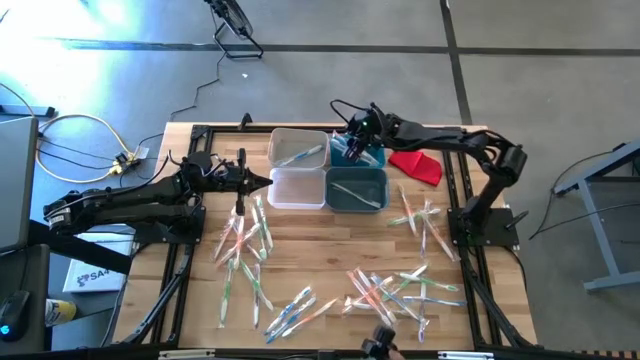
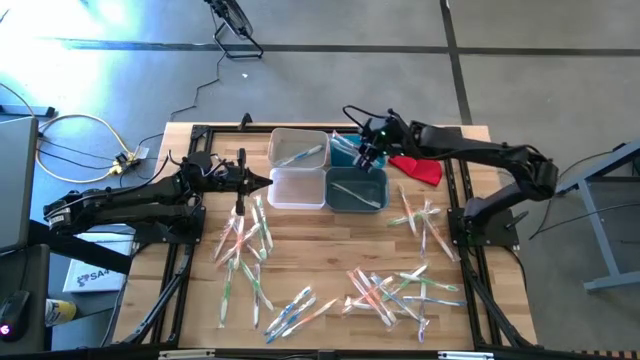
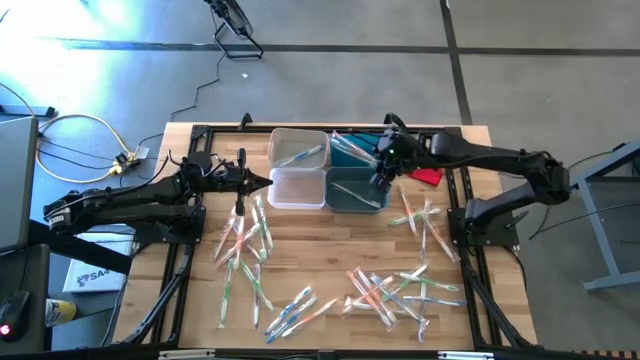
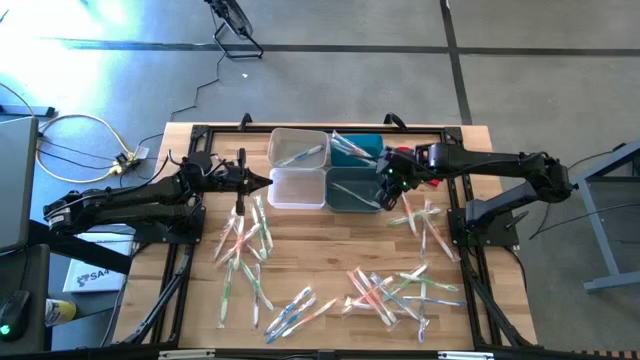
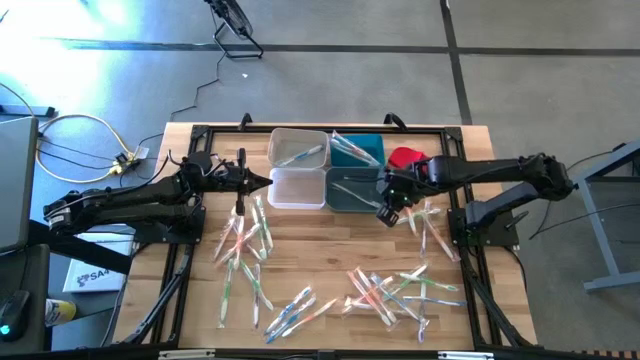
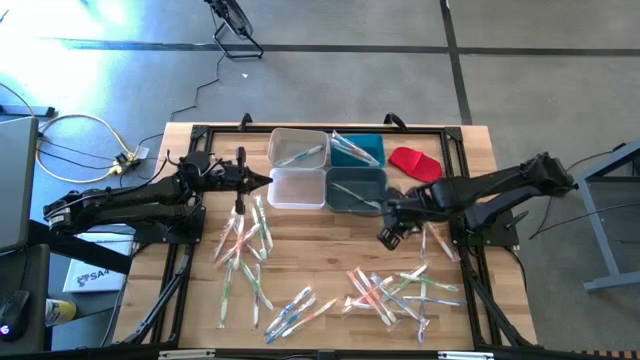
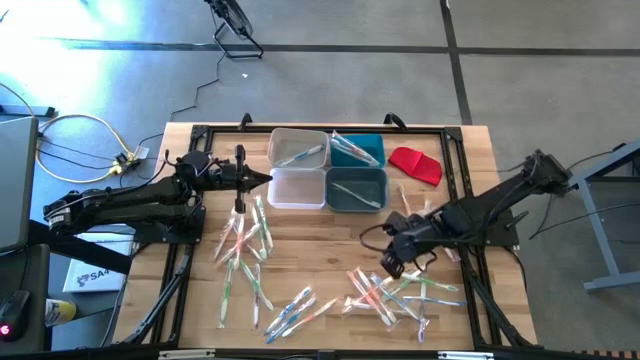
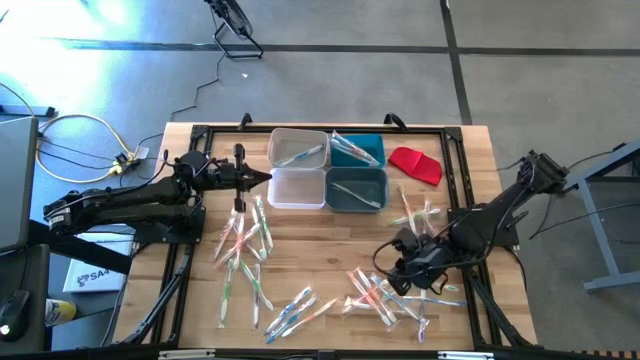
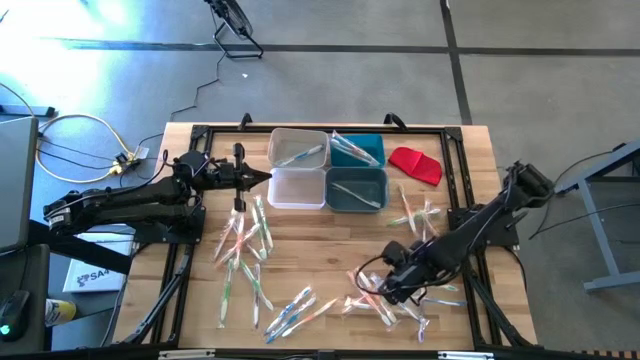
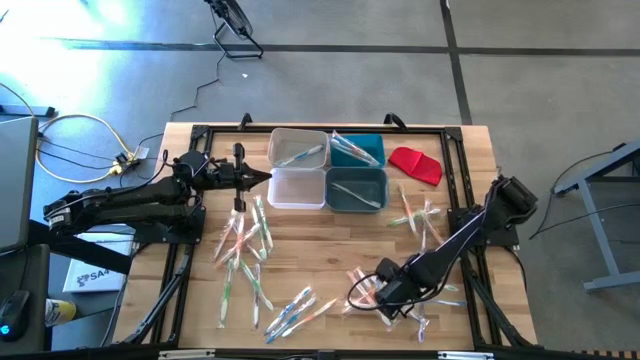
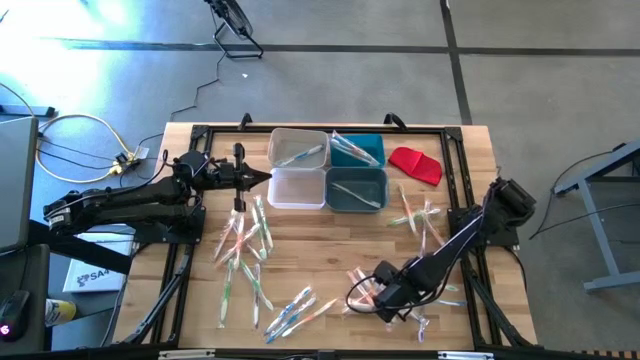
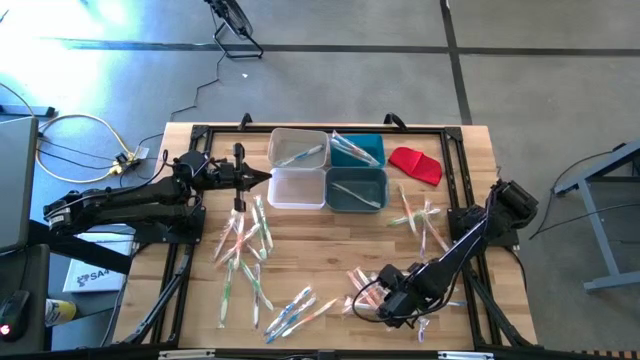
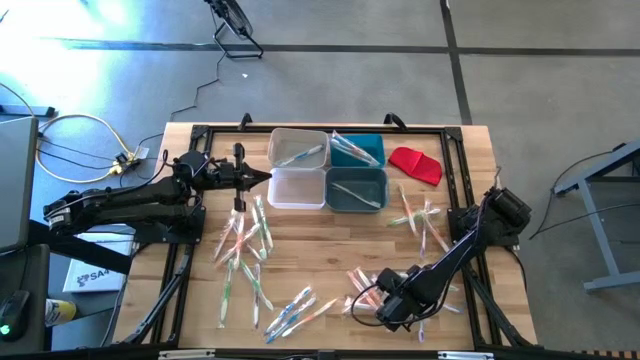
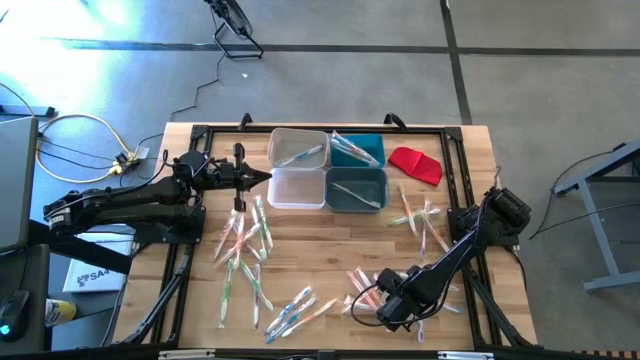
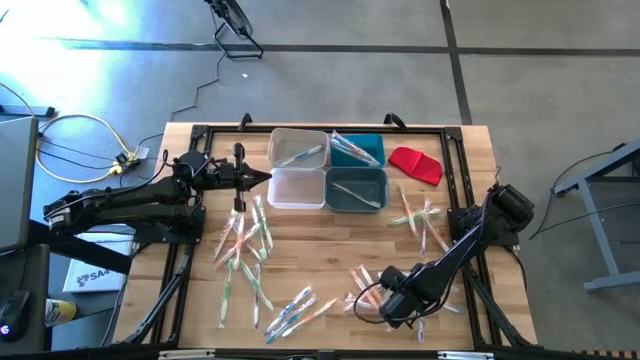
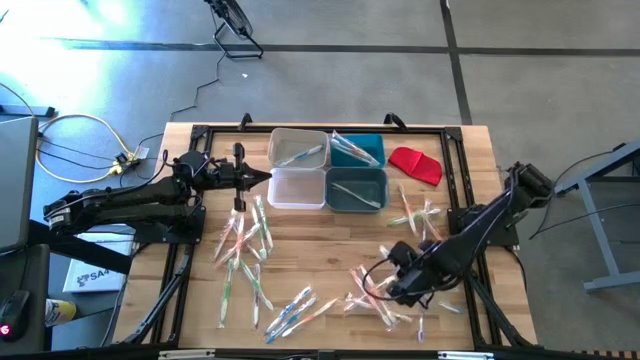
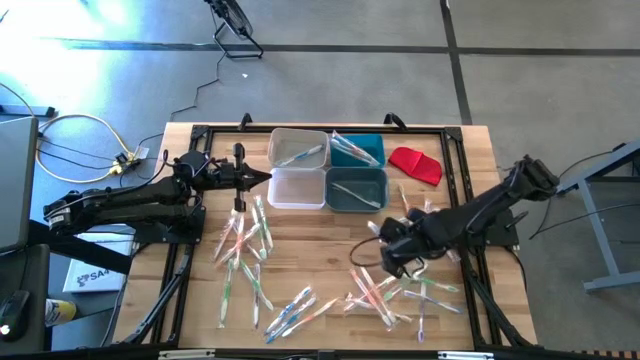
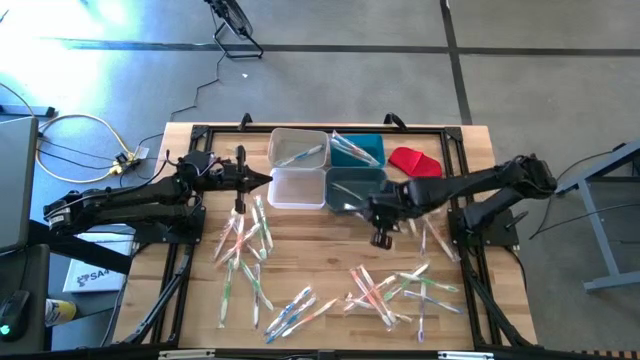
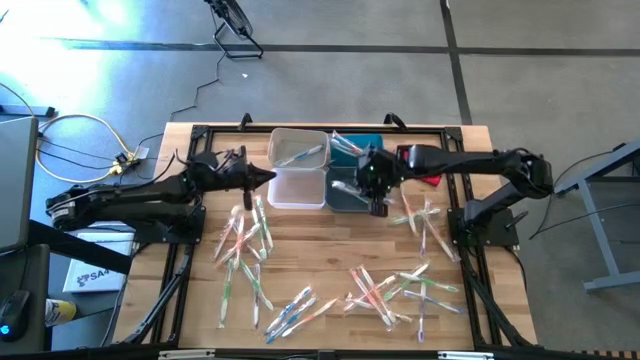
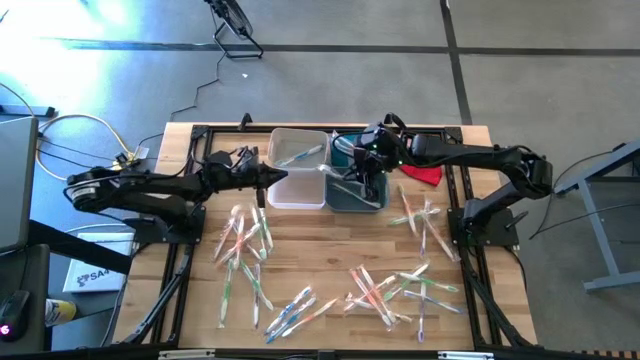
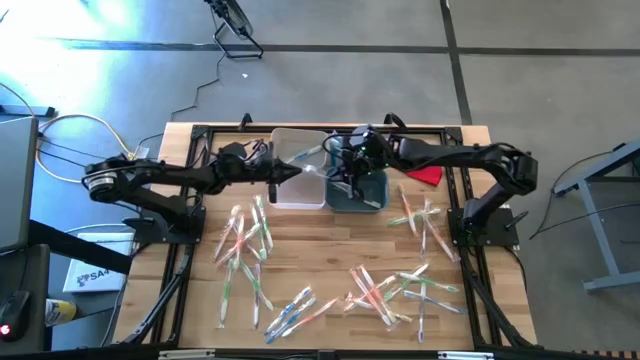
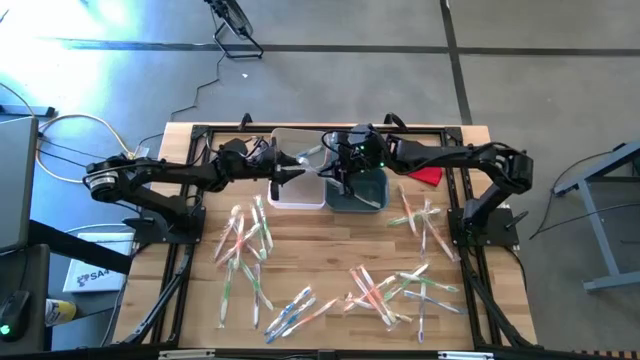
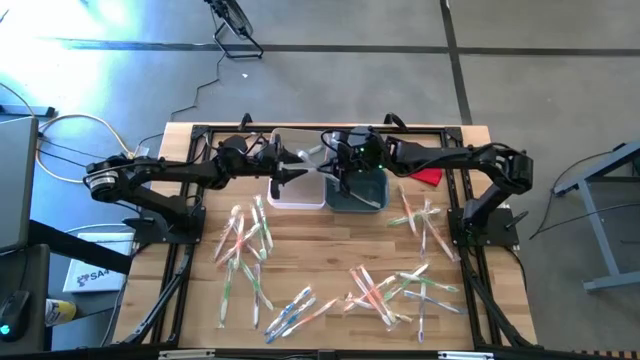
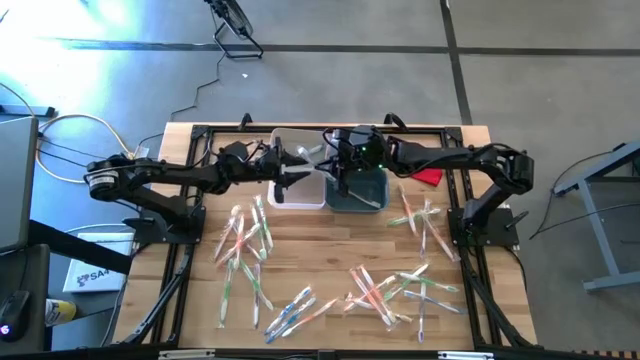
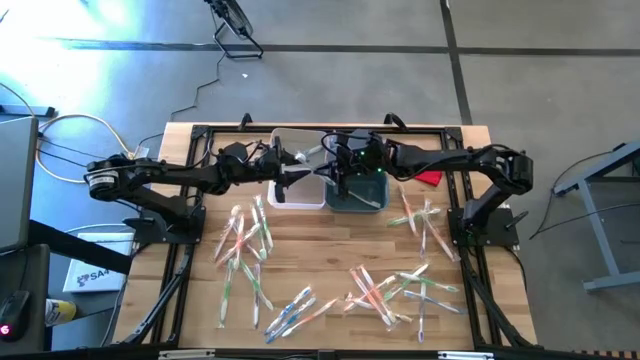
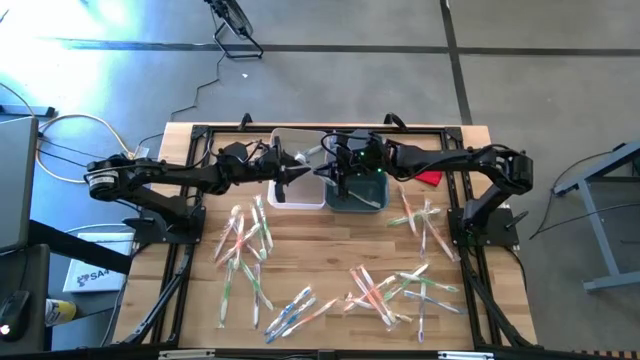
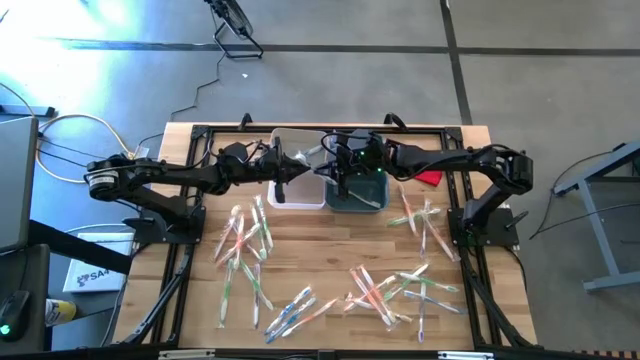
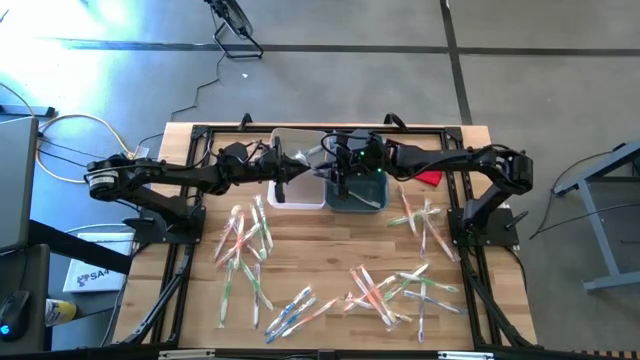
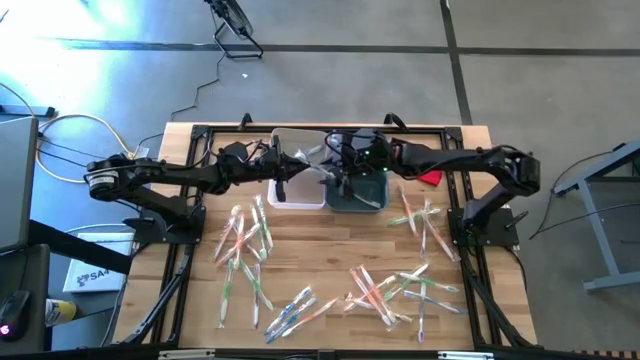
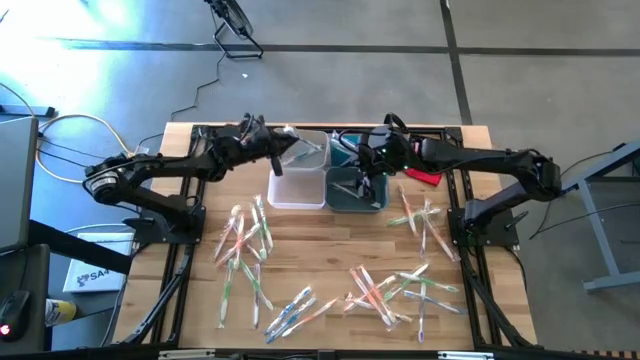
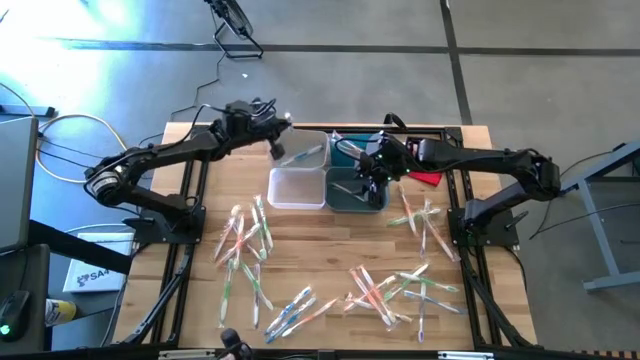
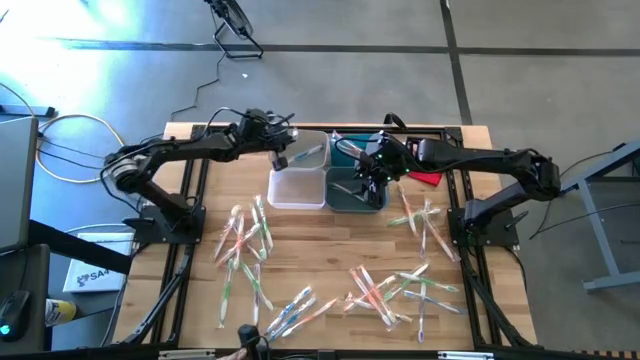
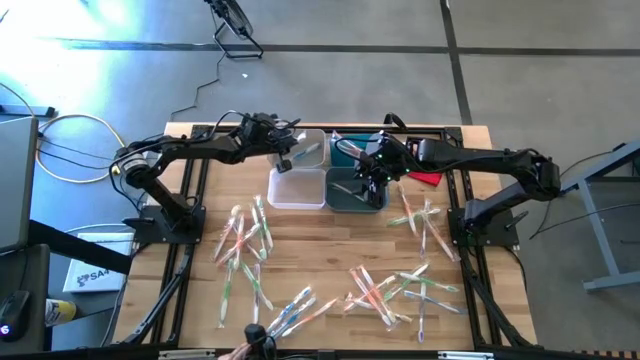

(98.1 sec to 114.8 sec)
Task: Pick & Place Toothbrushes
Put the blue toothbrush into the white bin

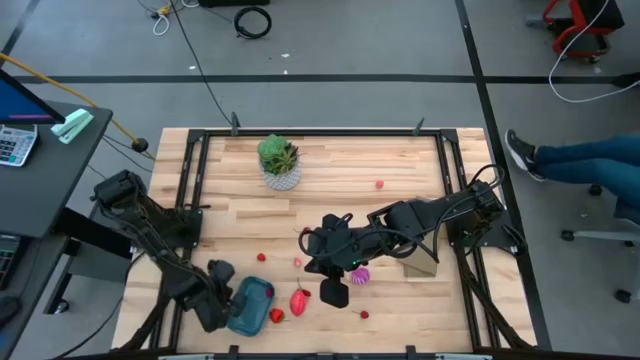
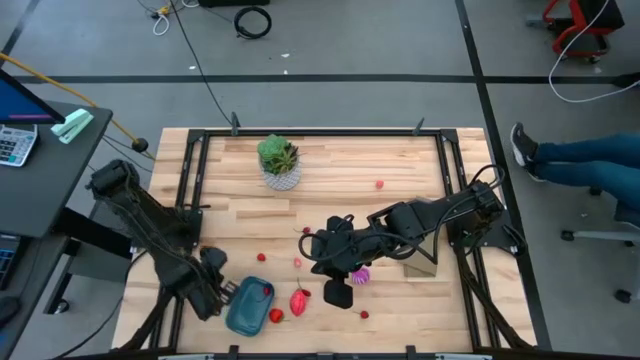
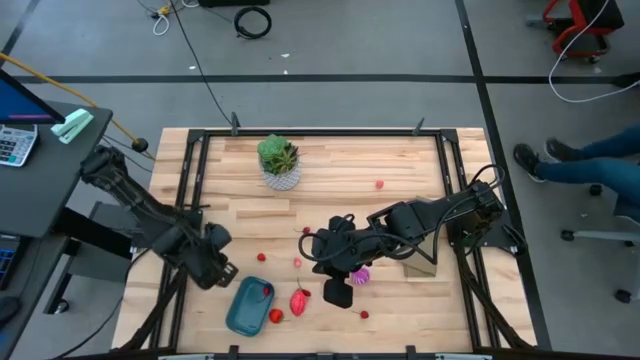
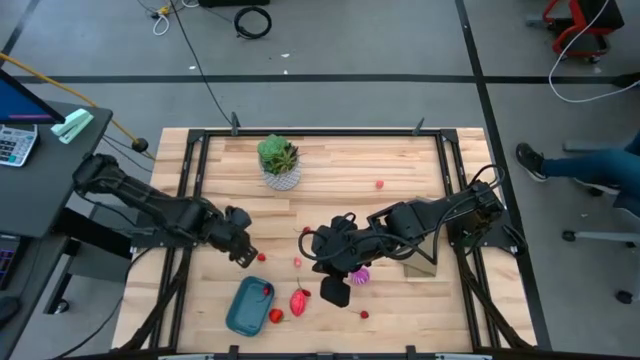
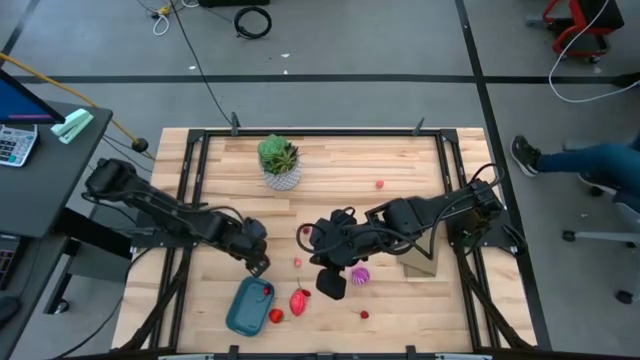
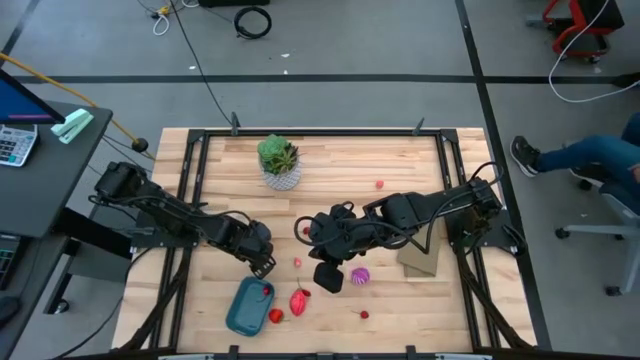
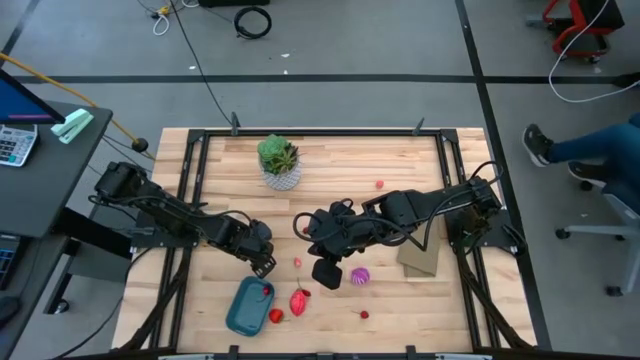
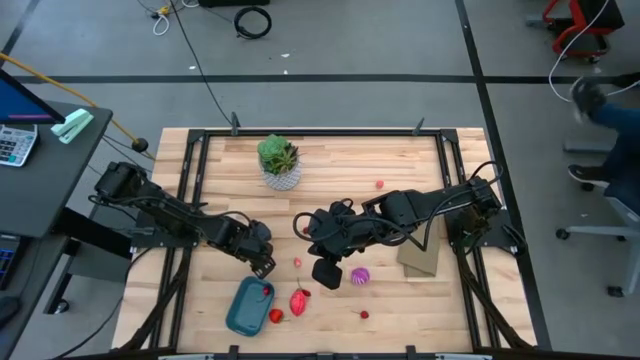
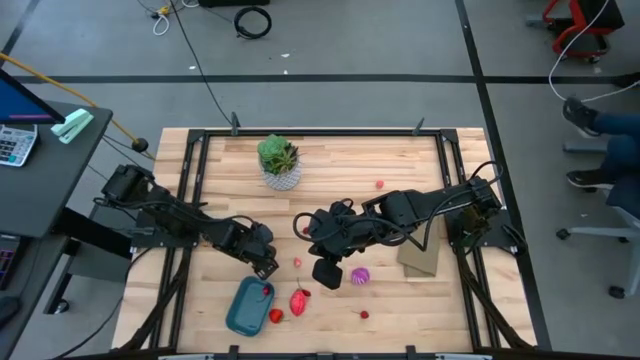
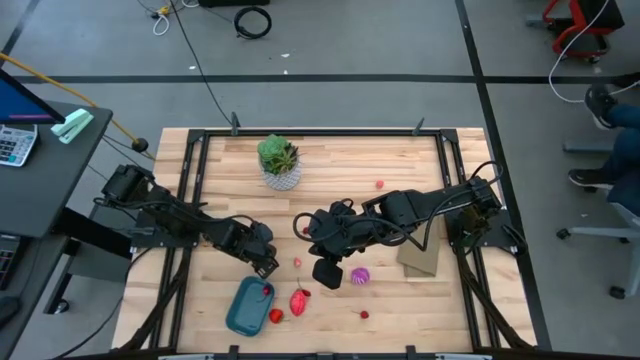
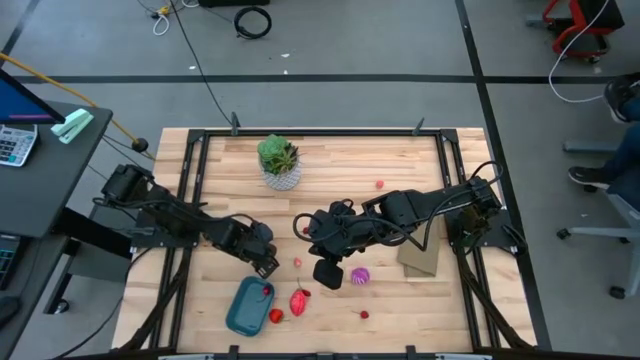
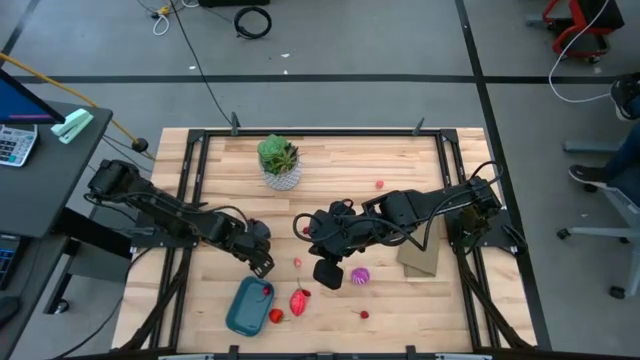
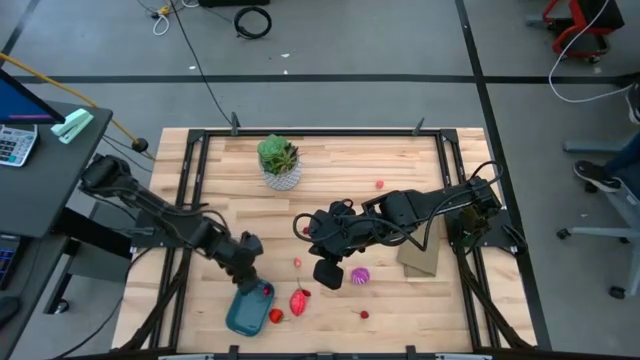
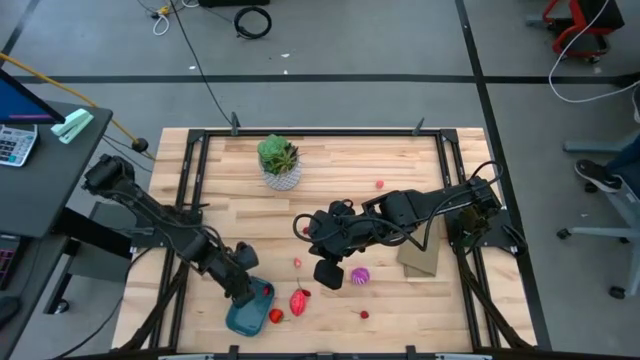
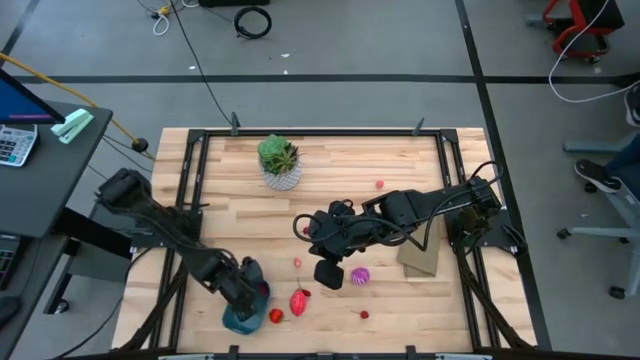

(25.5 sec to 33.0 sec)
Task: Pick and placing Produce into tupperware
Put the raspberry into the bin
